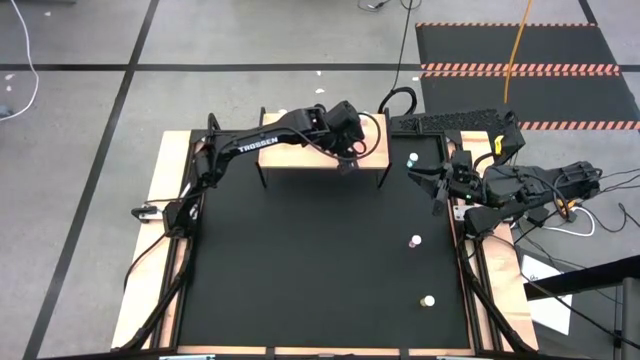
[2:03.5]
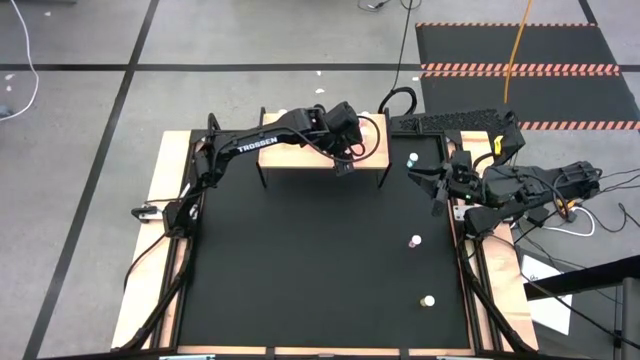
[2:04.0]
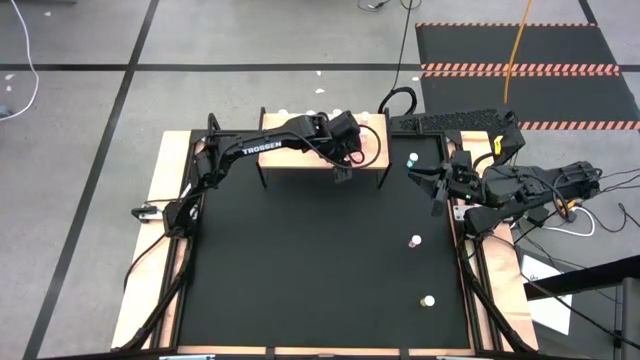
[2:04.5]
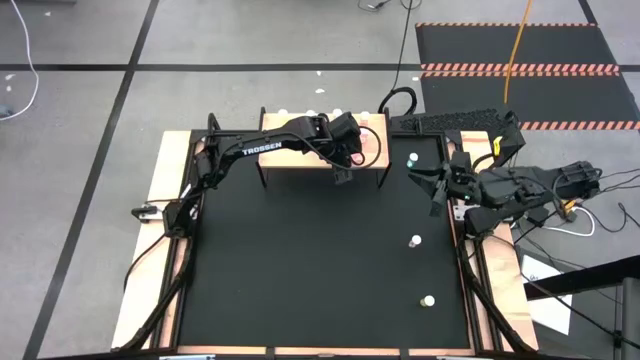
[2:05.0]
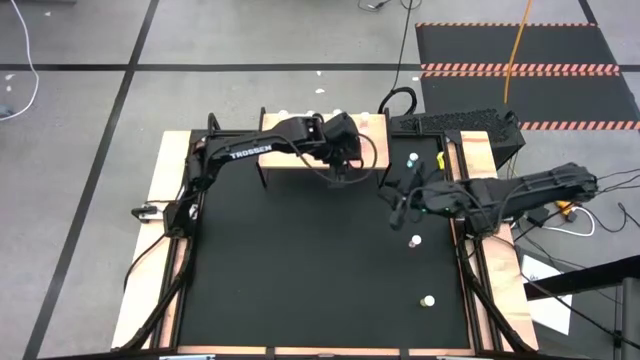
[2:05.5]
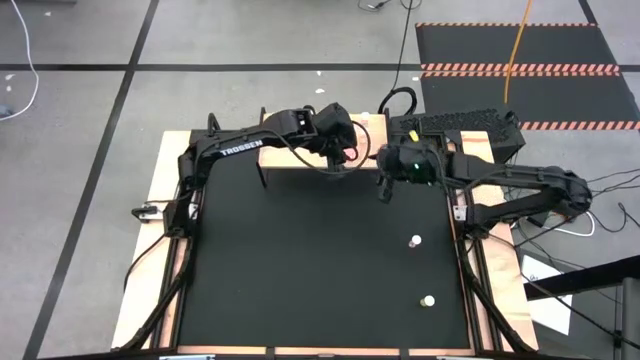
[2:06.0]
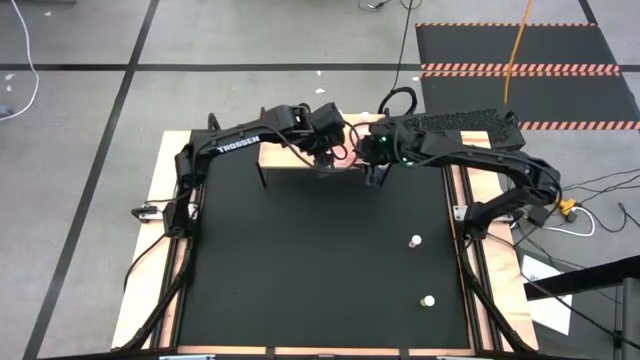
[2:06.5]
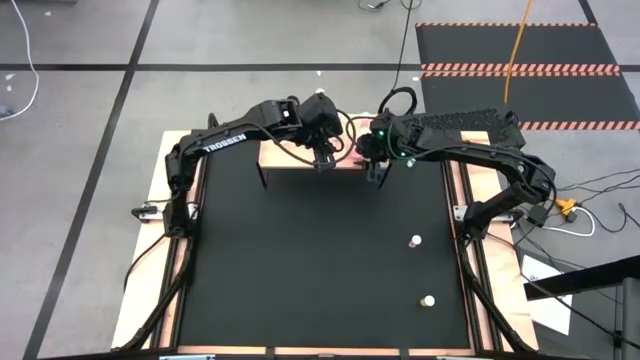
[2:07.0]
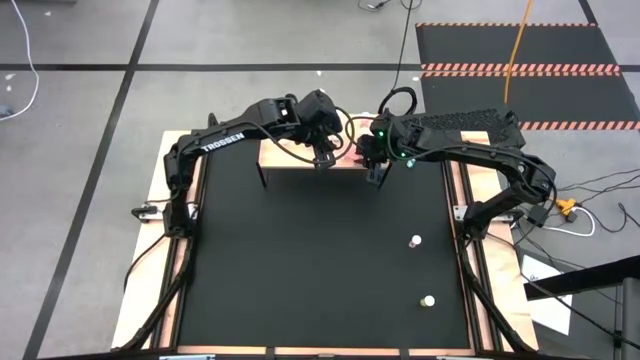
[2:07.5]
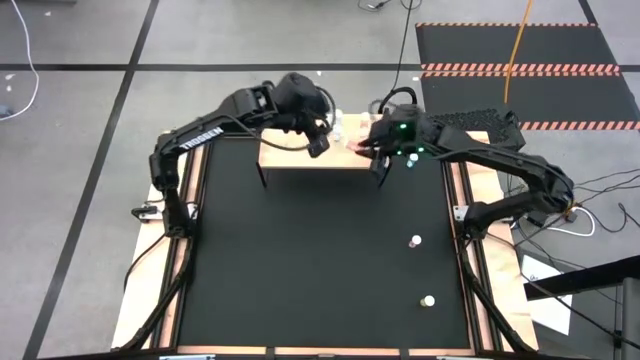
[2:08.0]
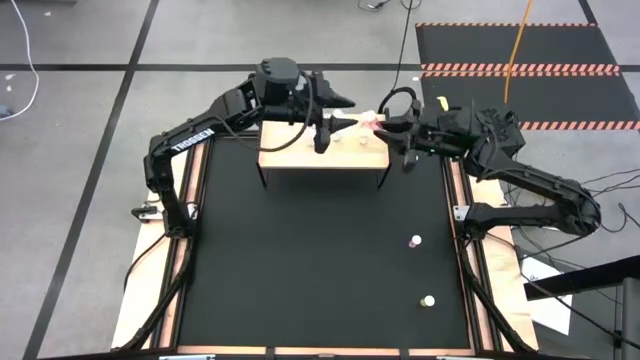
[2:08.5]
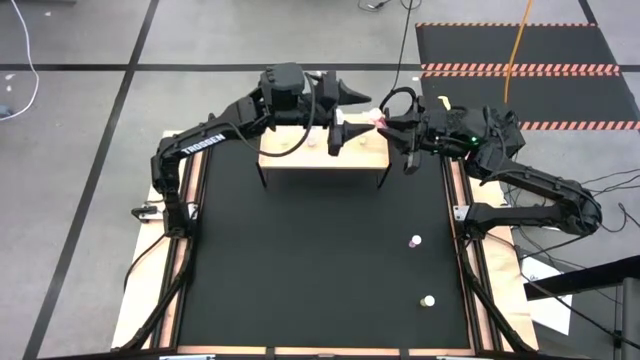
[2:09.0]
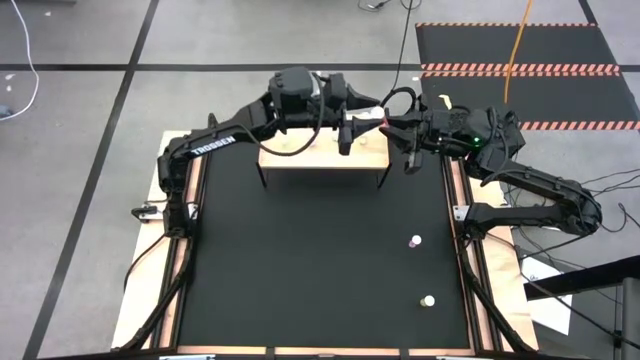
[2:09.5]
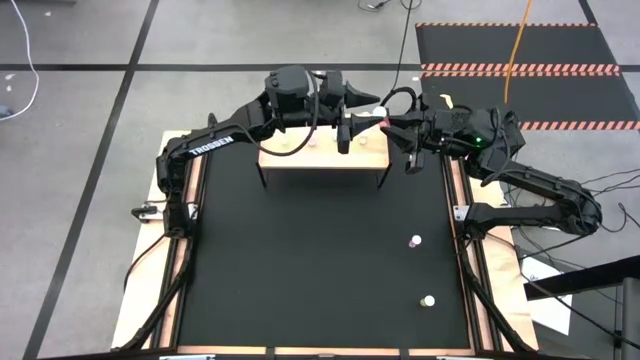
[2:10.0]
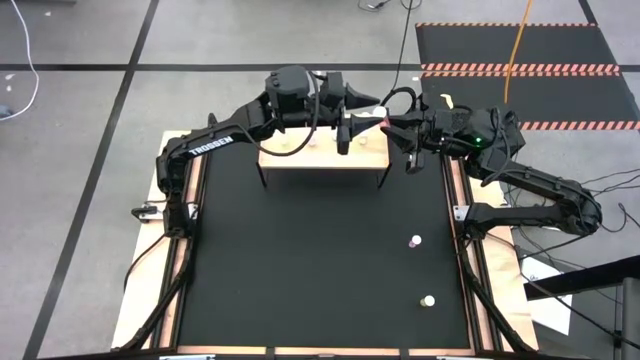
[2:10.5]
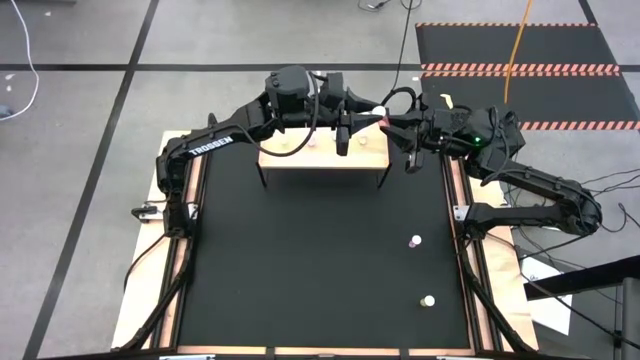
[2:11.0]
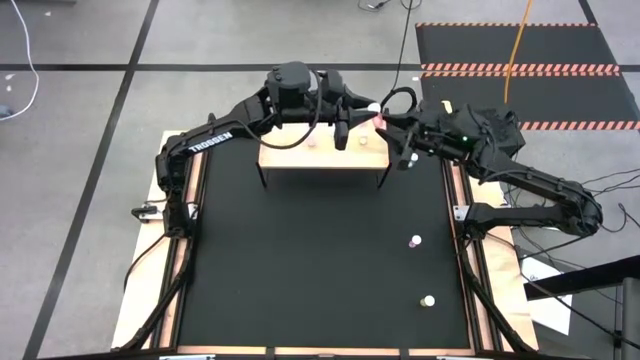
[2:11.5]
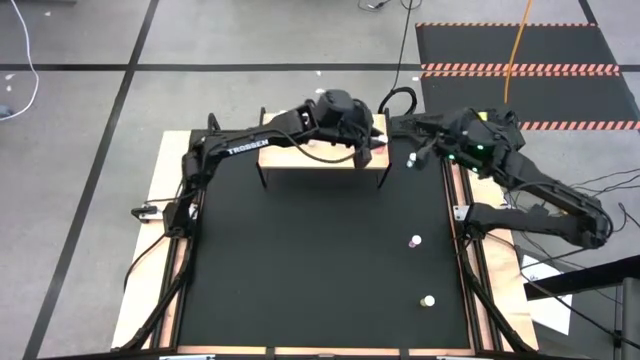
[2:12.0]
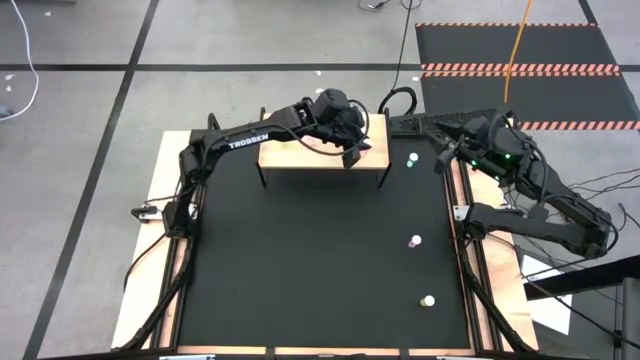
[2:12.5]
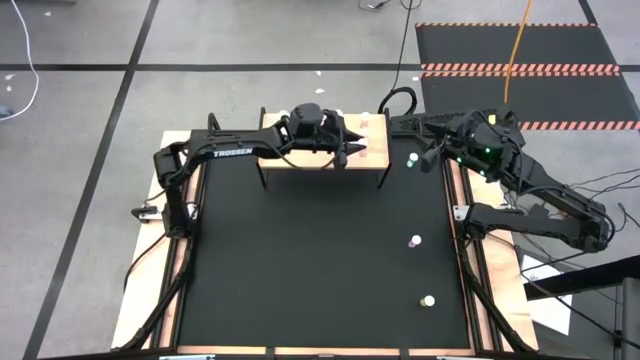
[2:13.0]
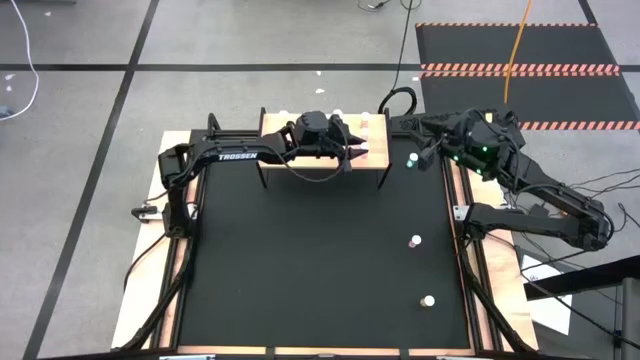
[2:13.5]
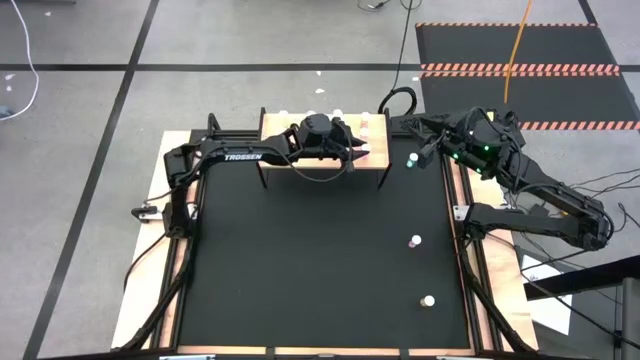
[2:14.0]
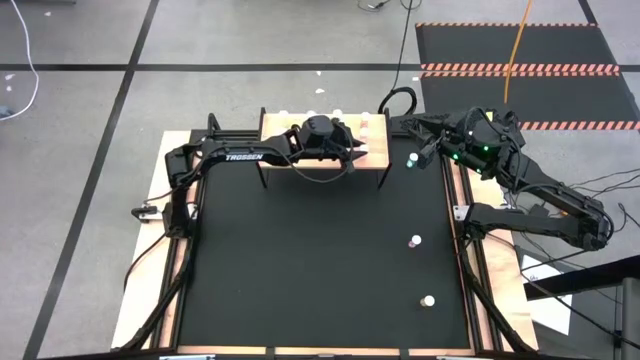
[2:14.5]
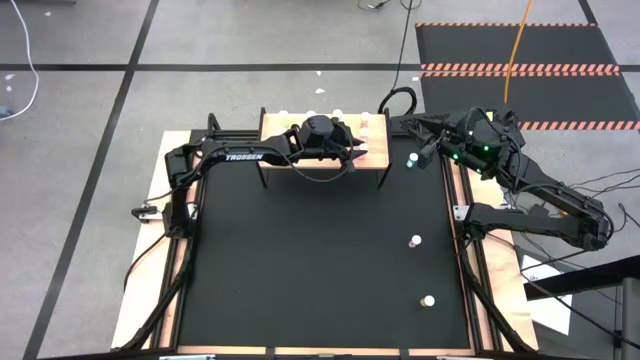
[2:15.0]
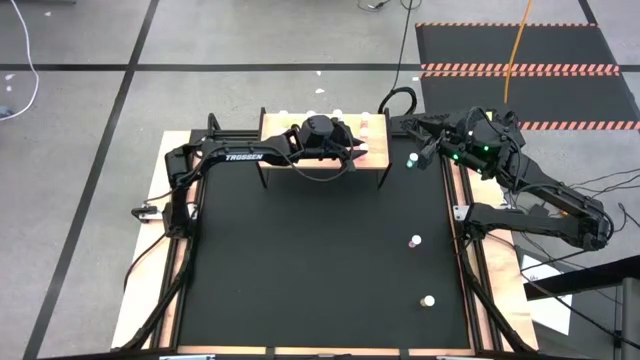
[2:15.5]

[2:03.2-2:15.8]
Task: Pick and place medicine bottles onto shelf by color
Put the orange pill bottle on the shelf aligned with the other orange pill bottles

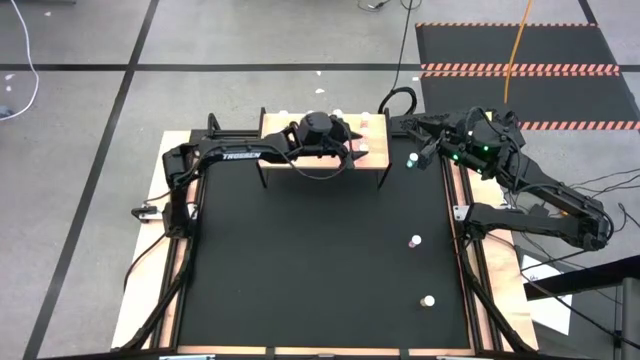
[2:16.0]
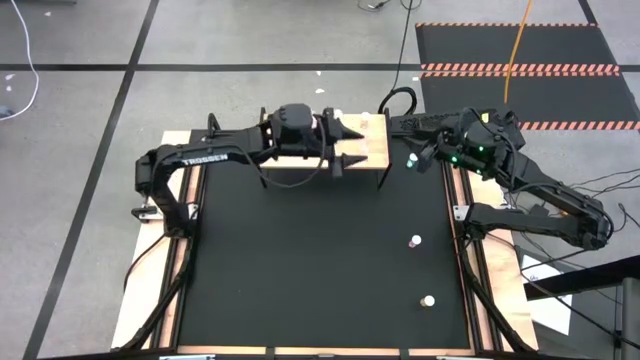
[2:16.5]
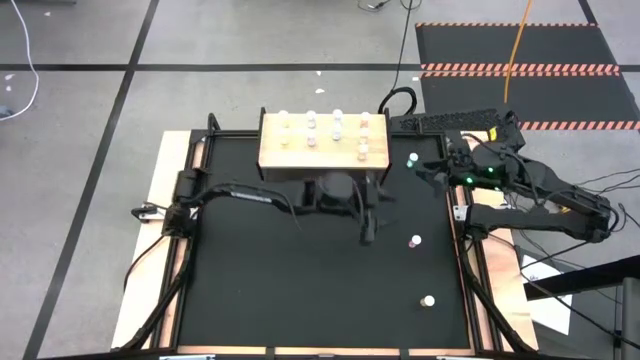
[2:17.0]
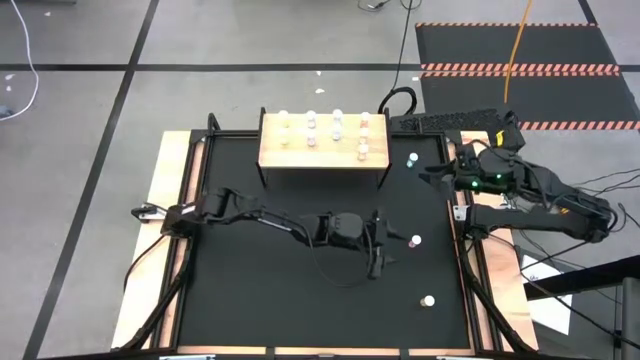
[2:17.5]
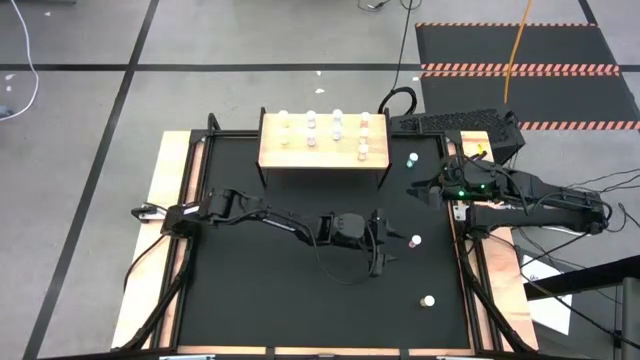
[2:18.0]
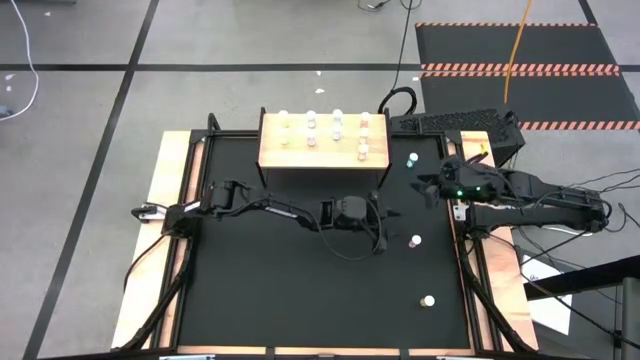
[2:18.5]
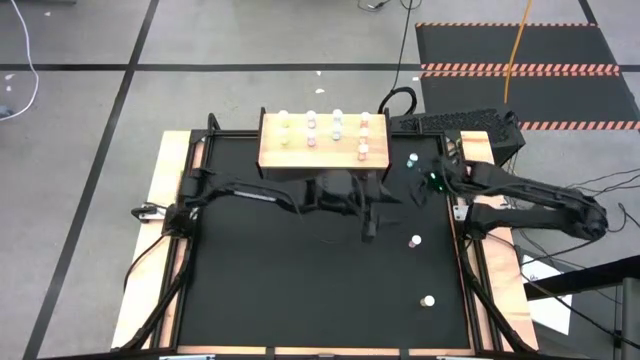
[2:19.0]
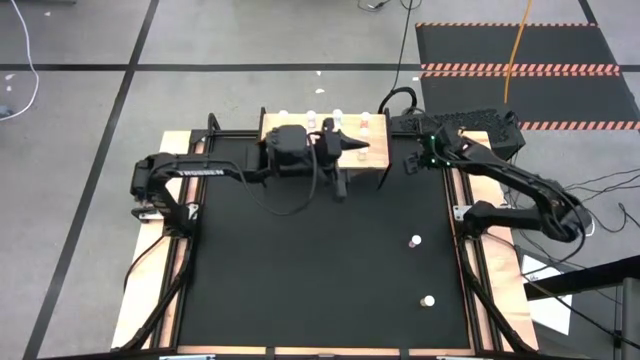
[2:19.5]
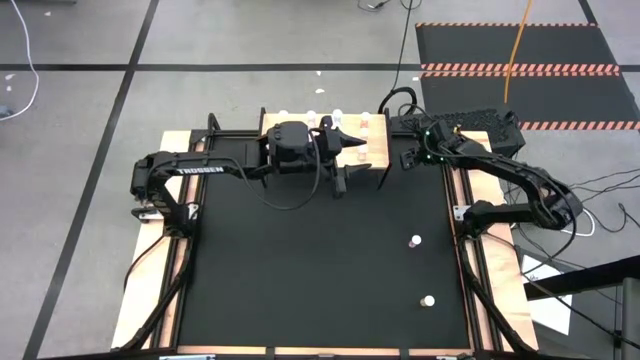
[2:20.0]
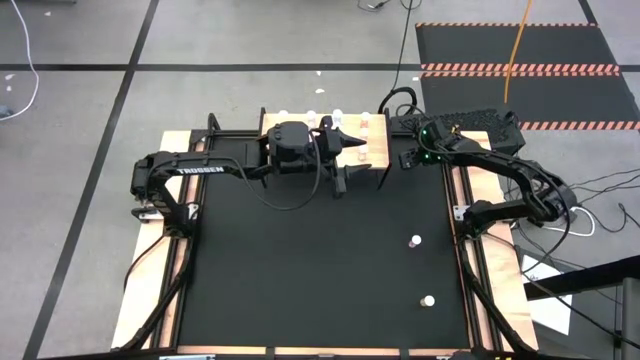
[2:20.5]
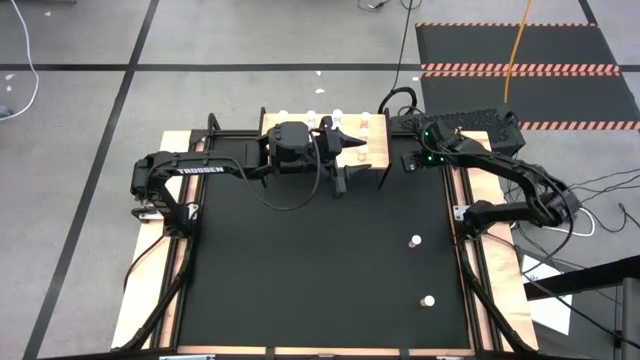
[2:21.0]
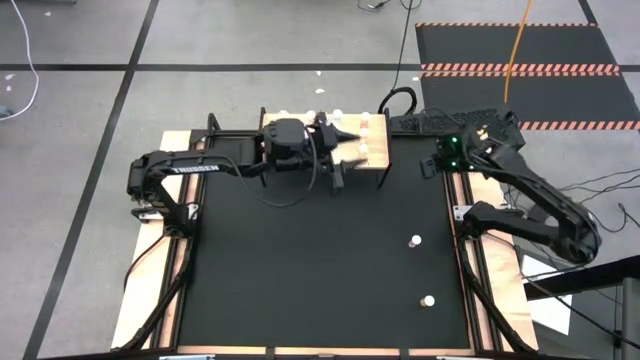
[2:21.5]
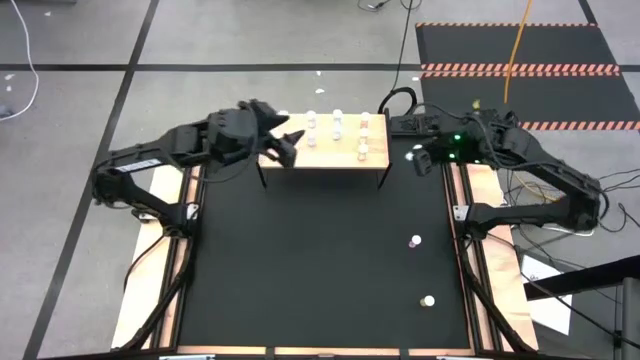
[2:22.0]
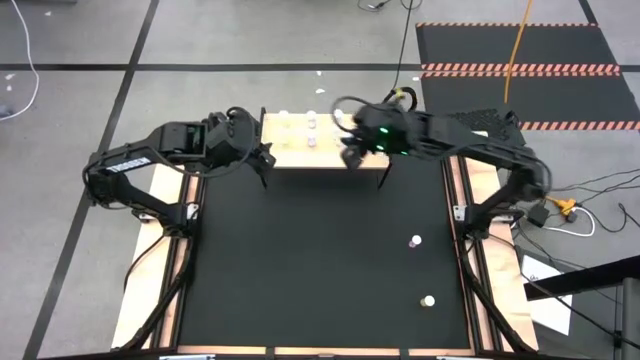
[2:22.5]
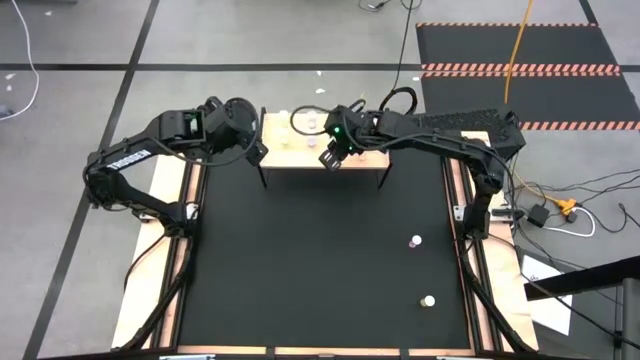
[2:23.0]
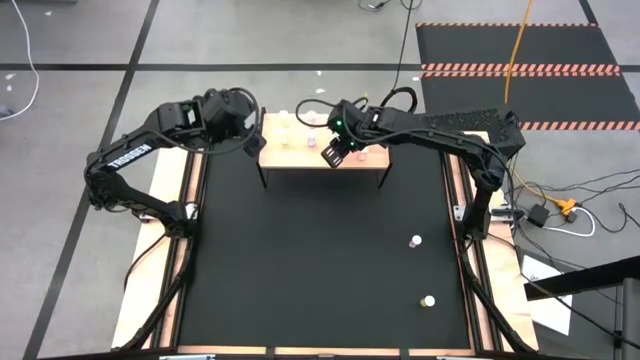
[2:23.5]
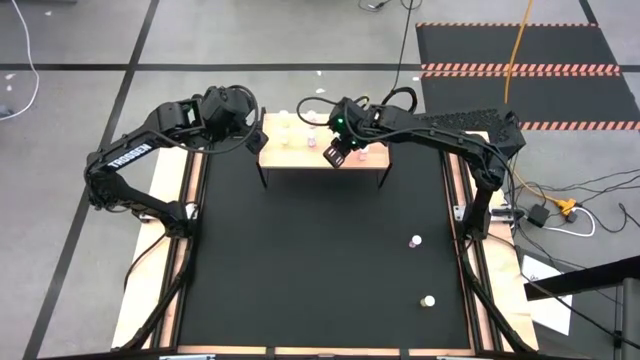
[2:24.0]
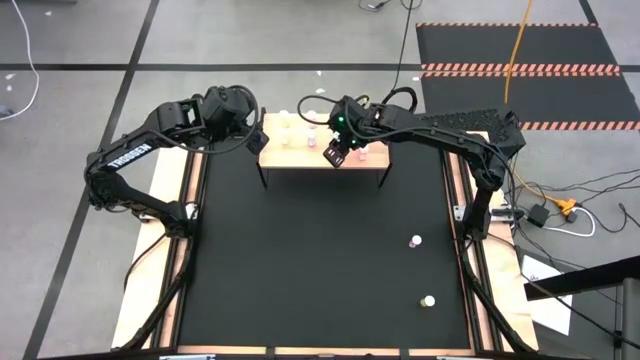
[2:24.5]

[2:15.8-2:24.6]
Put the blue pill bottle on the shelf aligned with the other blue pill bottles
